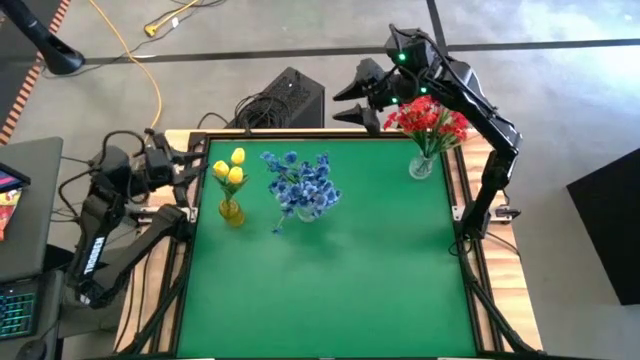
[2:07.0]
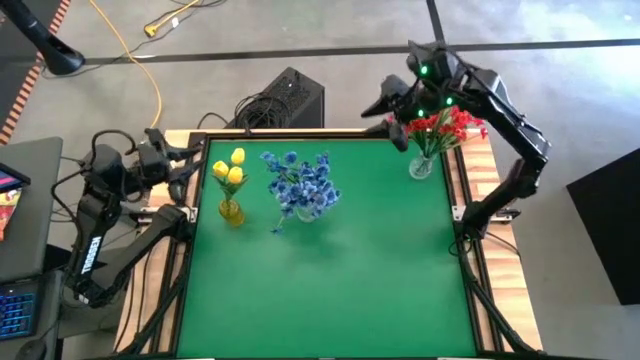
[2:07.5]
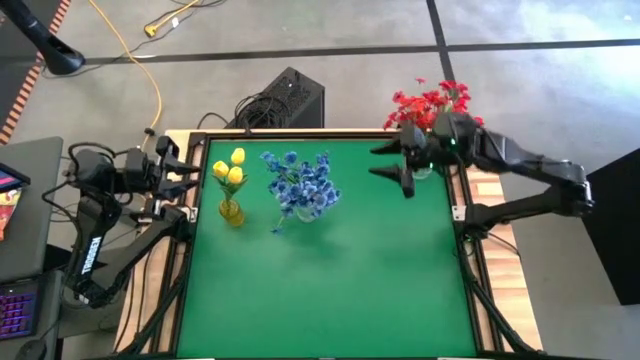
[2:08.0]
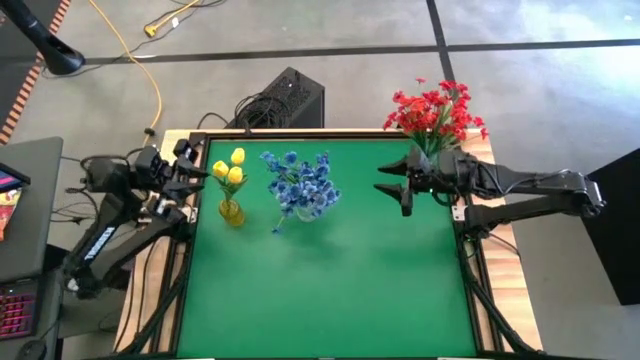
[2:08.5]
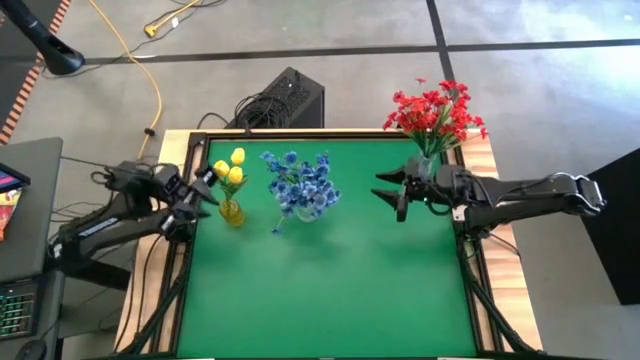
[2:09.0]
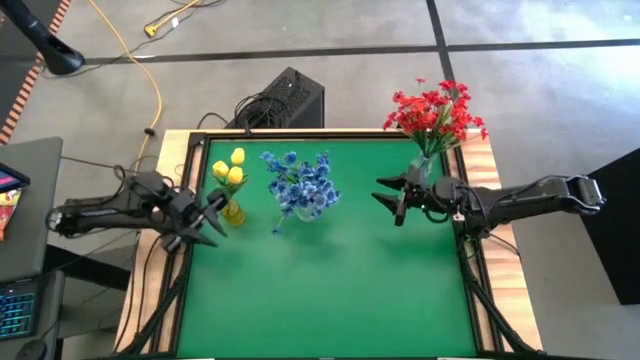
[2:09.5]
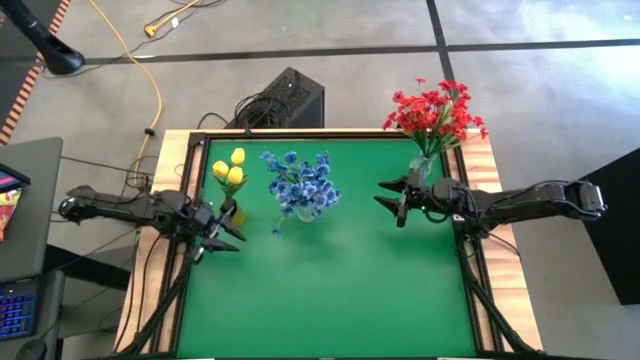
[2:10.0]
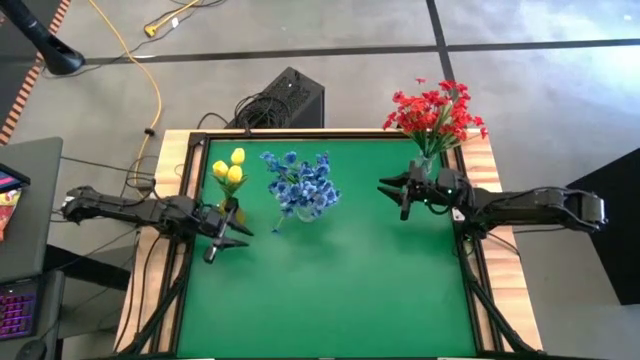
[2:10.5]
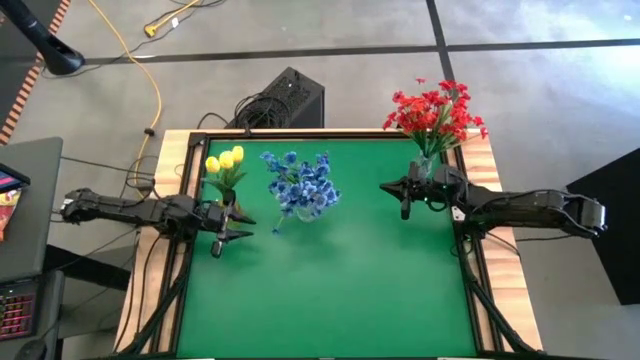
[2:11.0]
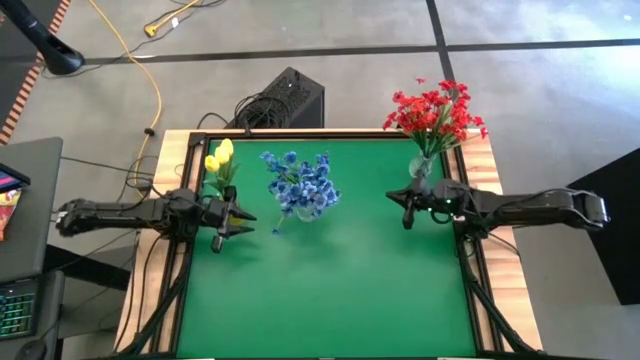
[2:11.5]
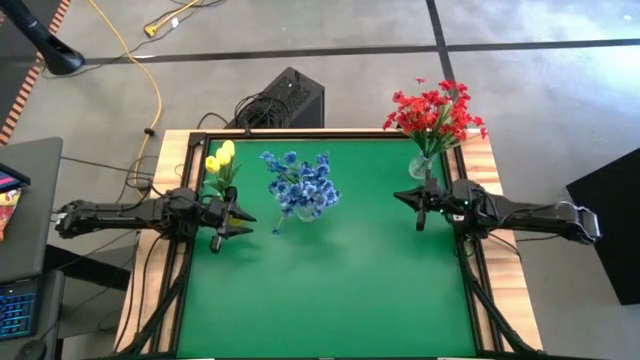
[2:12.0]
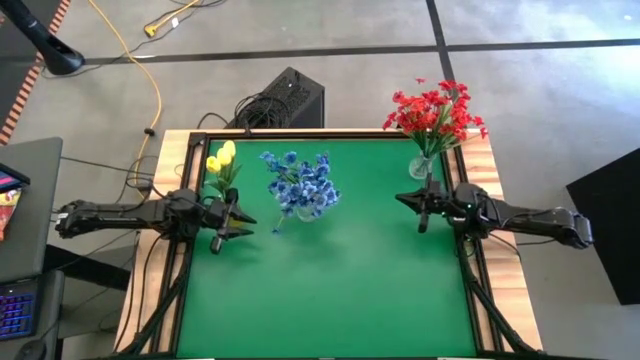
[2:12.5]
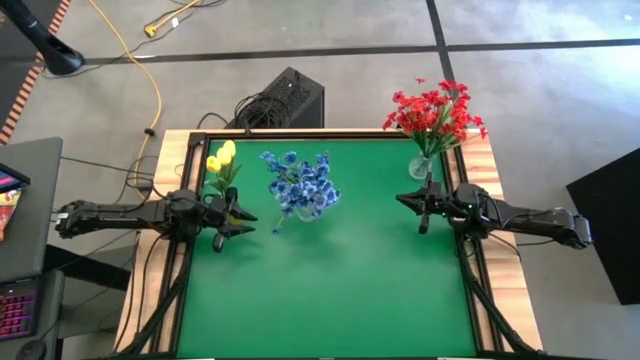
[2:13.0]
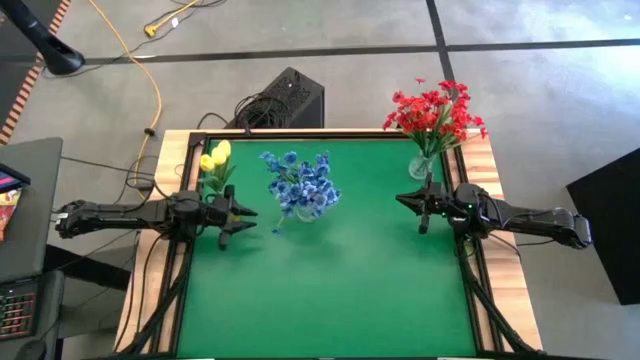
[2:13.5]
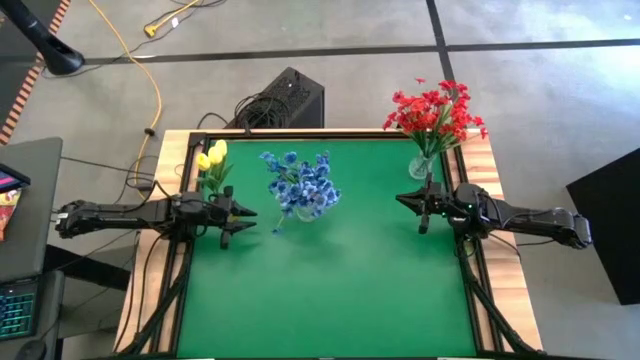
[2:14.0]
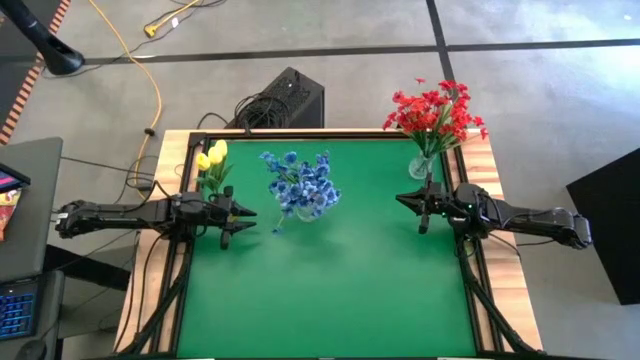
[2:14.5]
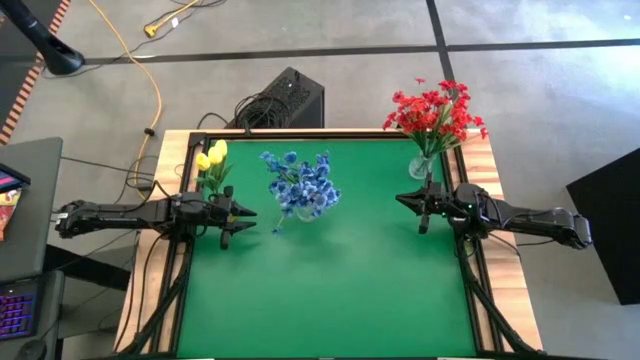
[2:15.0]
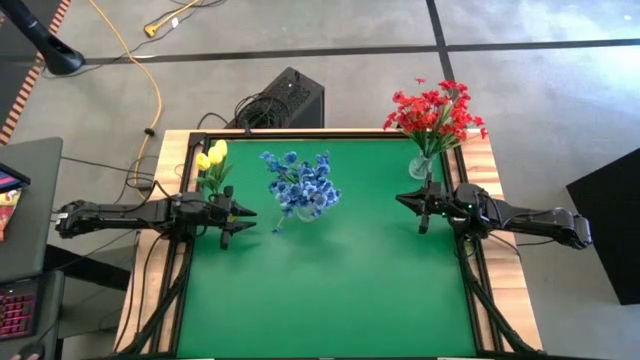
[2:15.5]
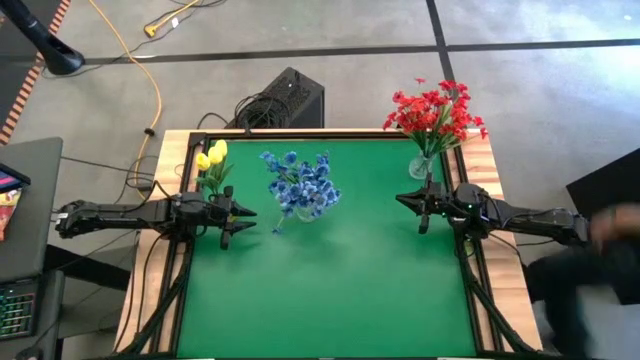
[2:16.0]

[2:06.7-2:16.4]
Task: Sort flowers into vase by color
Return to Home Position

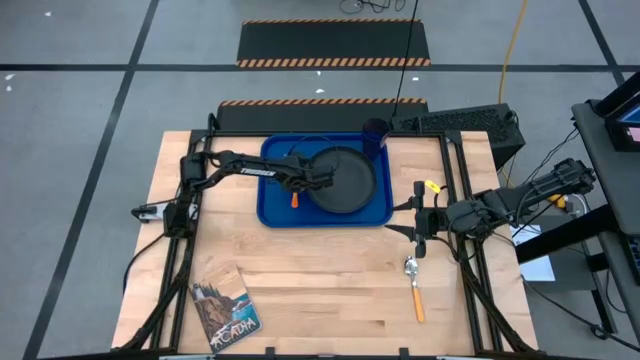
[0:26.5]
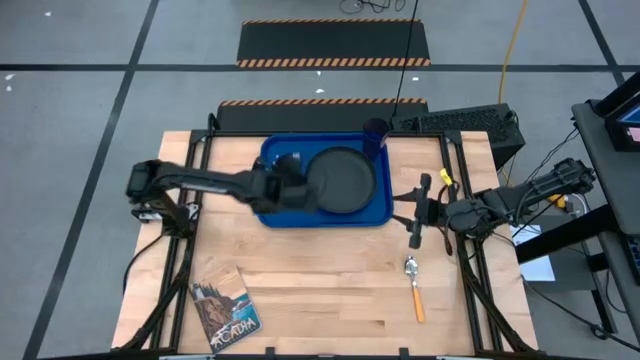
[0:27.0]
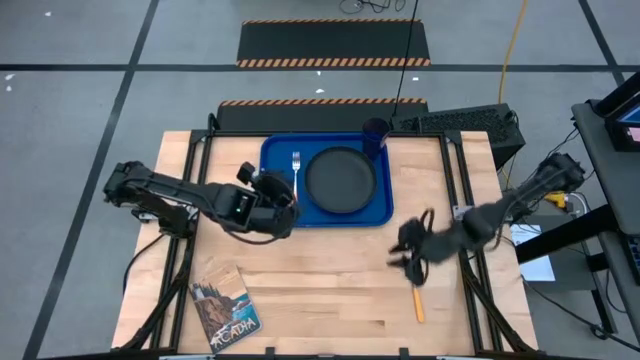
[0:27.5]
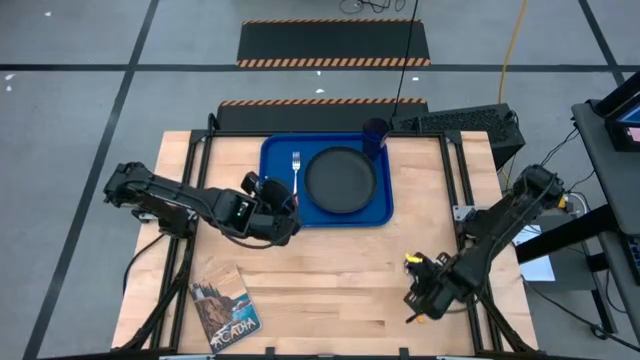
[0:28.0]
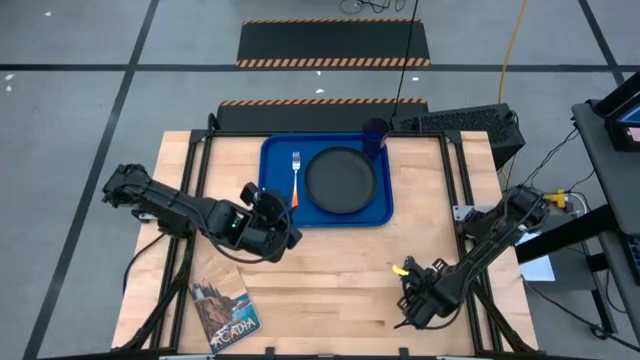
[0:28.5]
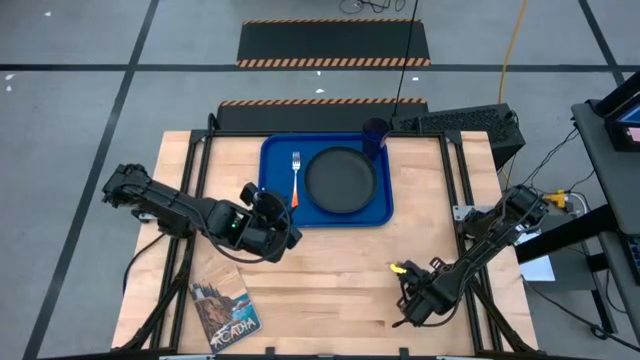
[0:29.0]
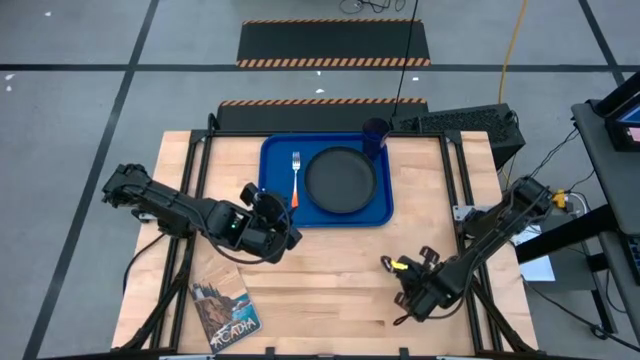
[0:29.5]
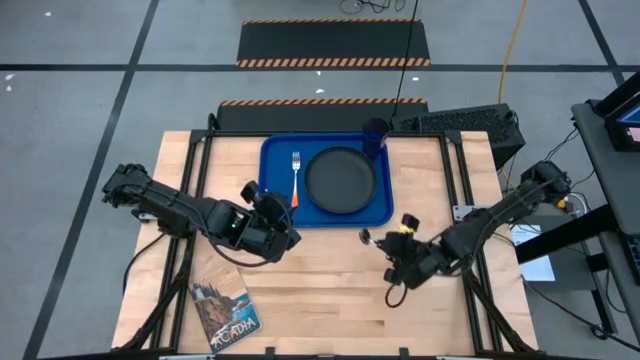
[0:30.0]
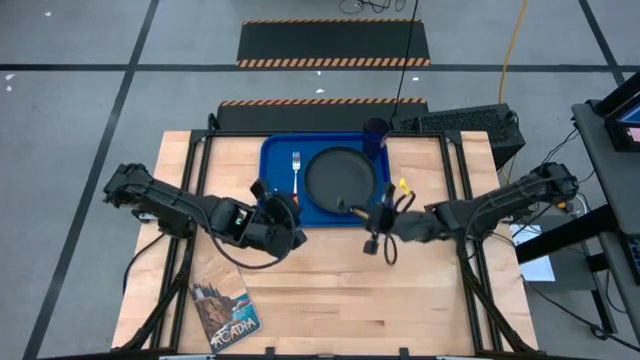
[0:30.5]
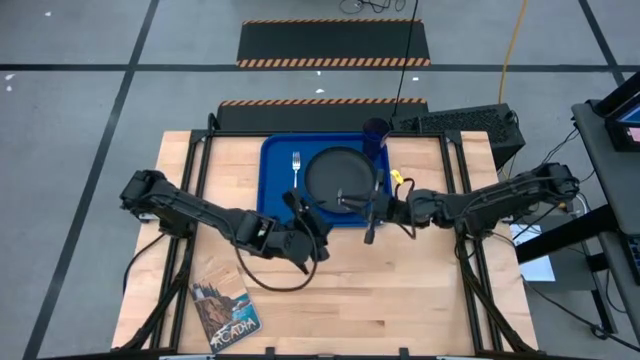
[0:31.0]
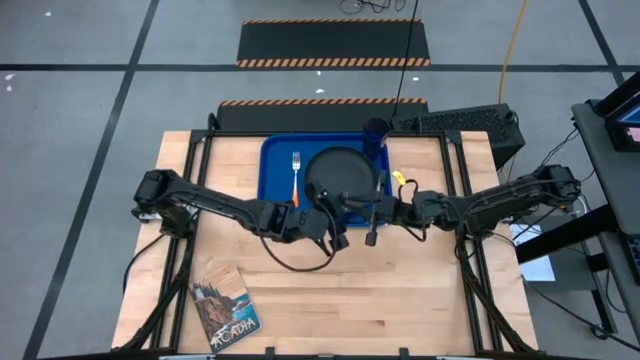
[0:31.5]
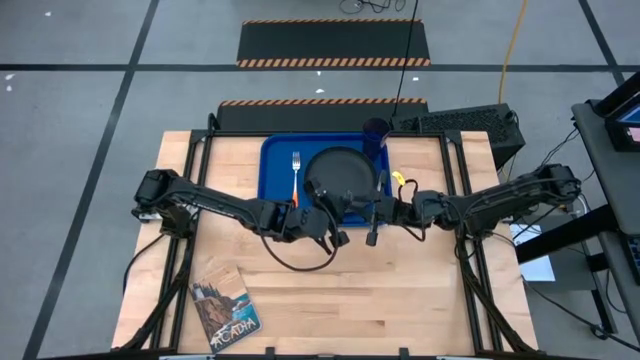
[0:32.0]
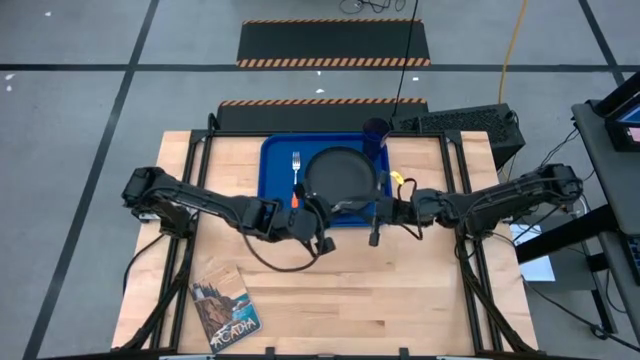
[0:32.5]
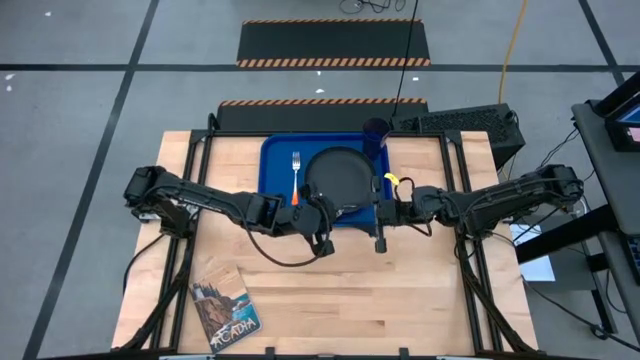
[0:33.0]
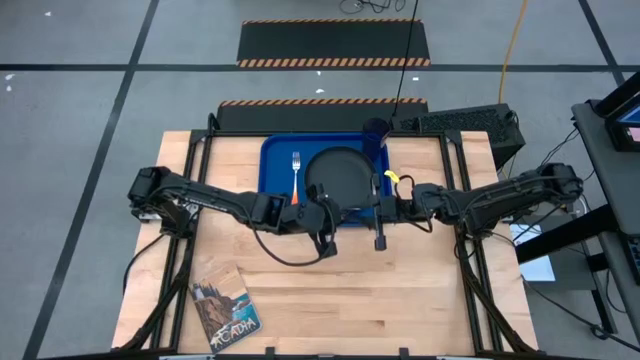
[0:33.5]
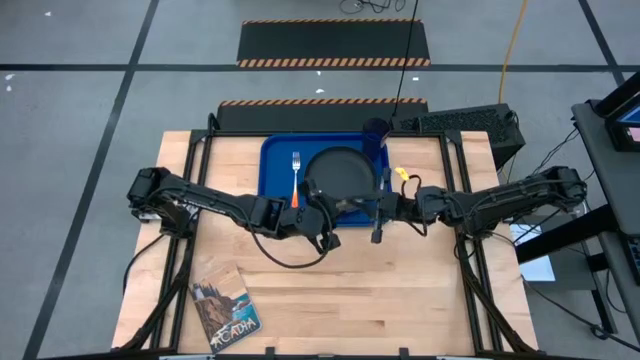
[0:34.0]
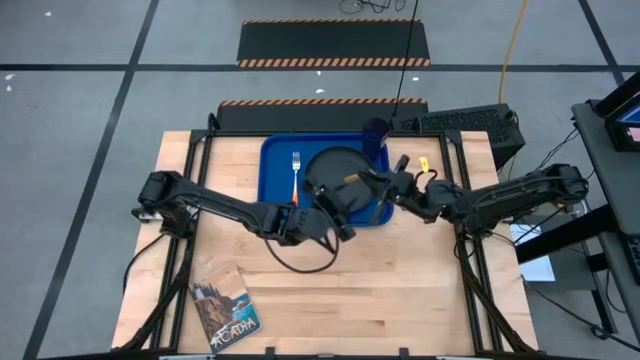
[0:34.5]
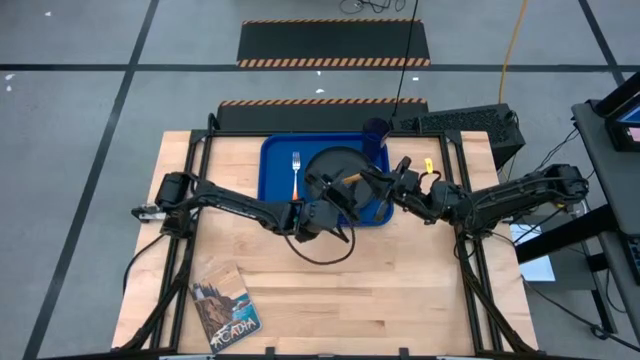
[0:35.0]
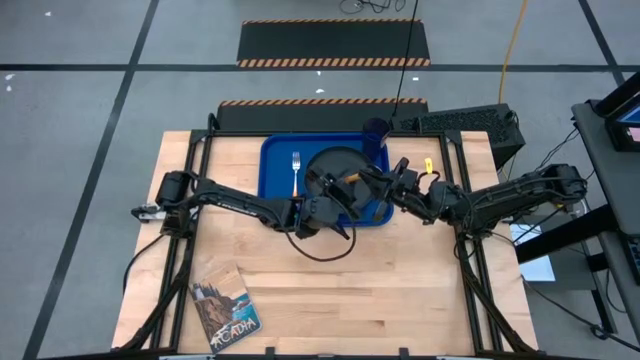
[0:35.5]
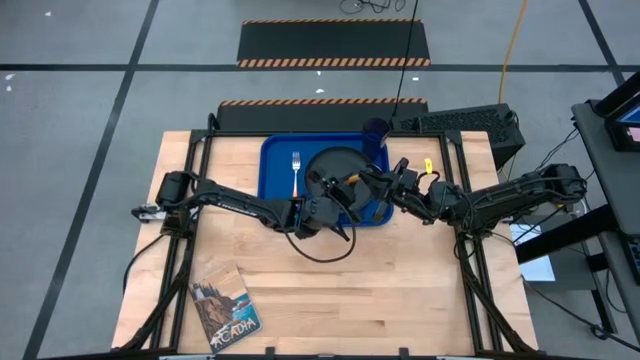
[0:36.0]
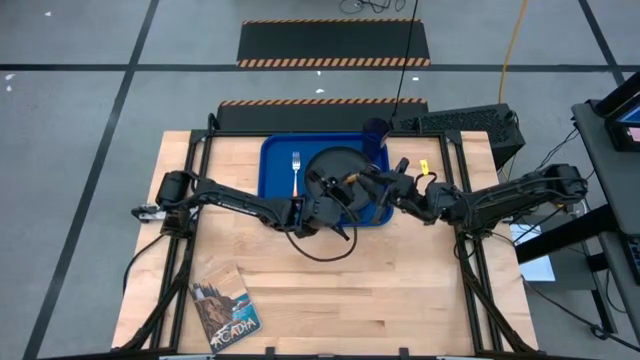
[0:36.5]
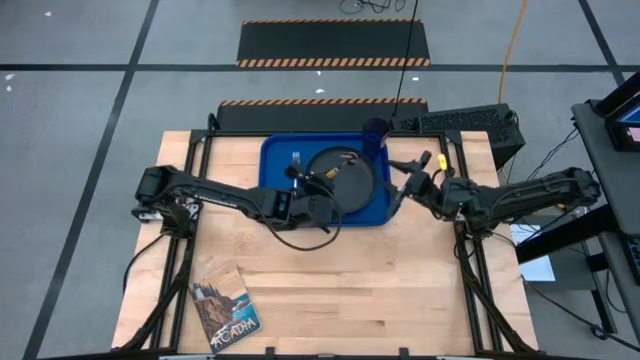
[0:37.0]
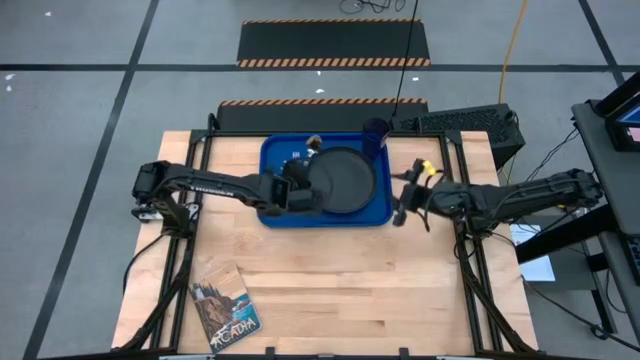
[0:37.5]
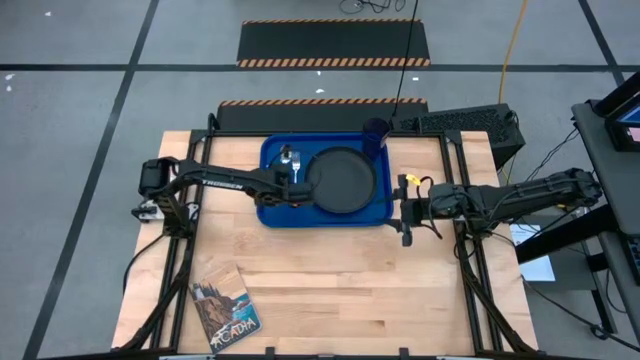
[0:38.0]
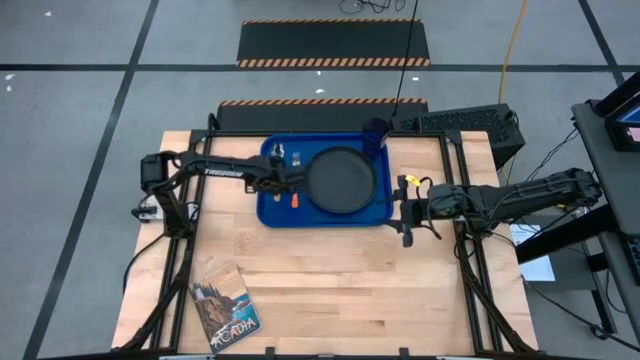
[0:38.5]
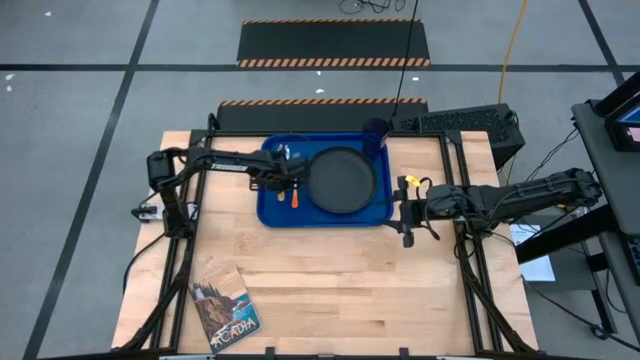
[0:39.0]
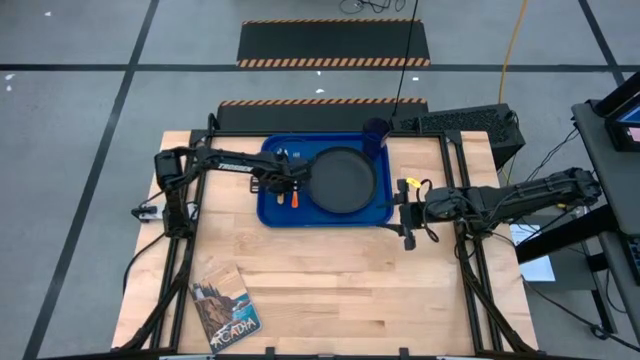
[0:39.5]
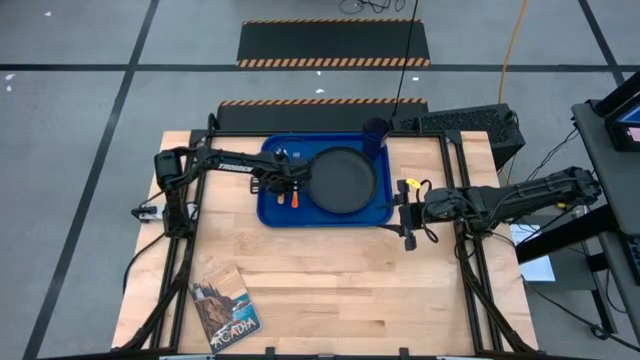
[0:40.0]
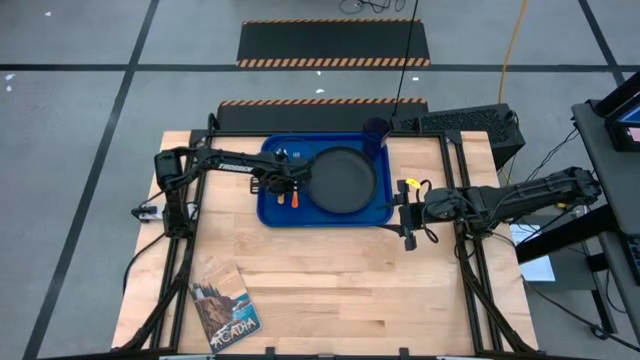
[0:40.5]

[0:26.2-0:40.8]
Task: Pick and place plate/cup/fork/spoon on tray
Put the yellow spoon on the blue serving tray to the left of the orange fork
